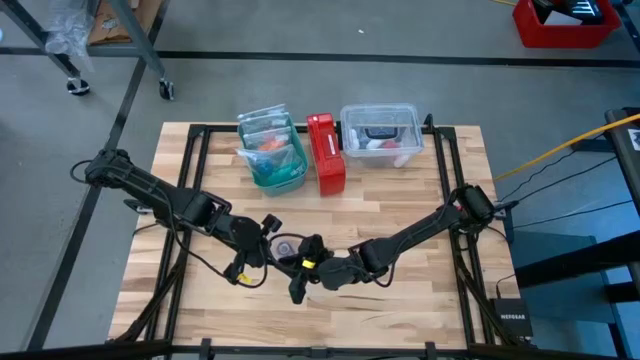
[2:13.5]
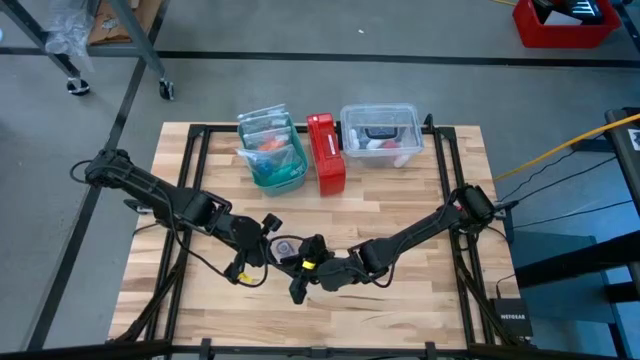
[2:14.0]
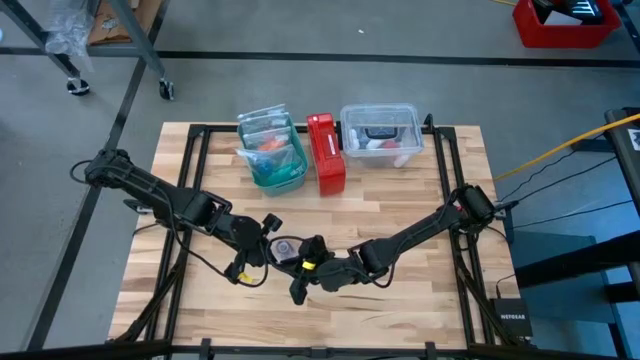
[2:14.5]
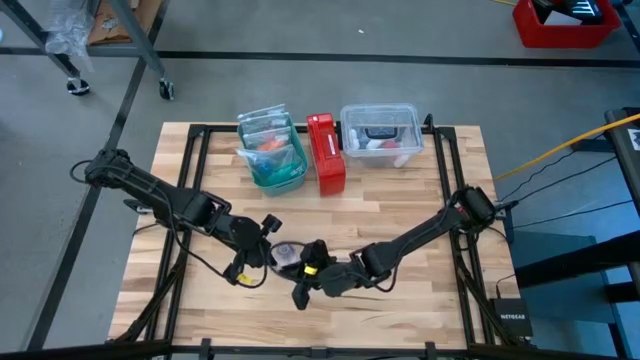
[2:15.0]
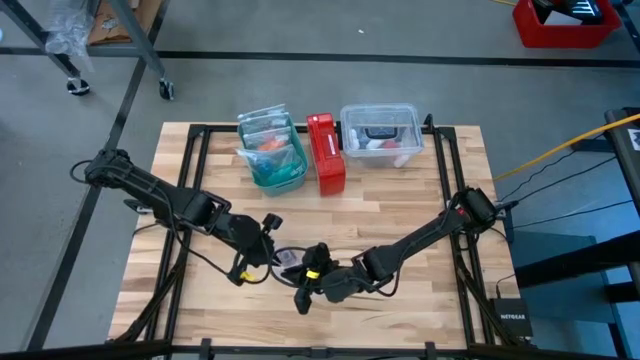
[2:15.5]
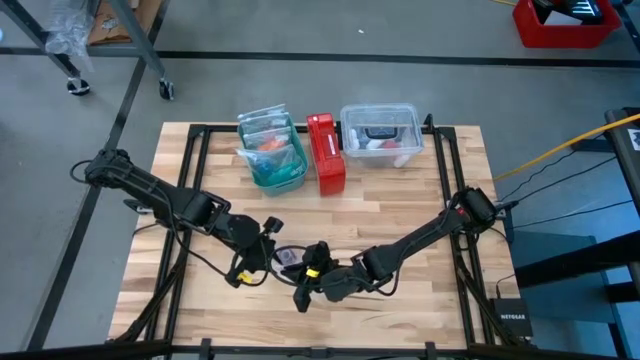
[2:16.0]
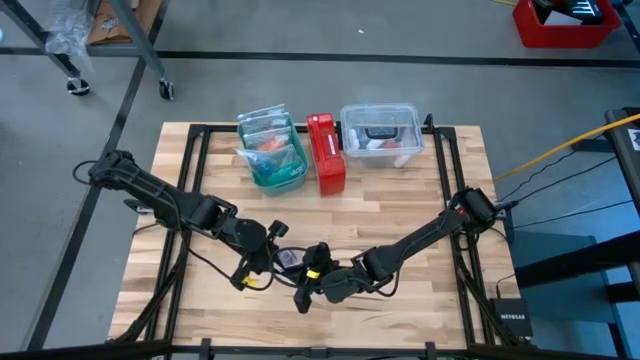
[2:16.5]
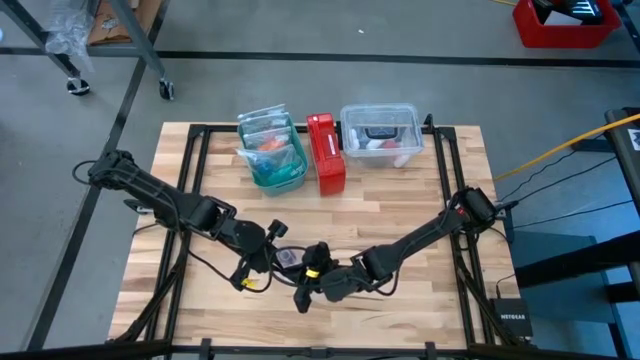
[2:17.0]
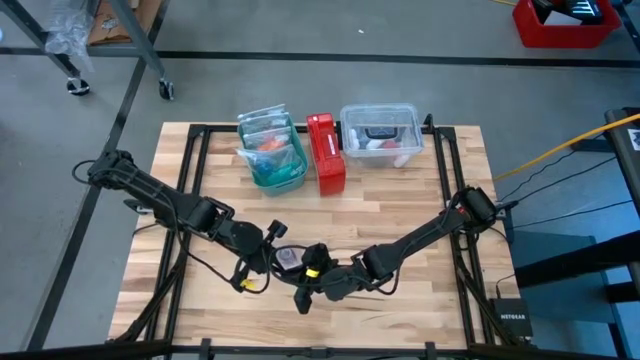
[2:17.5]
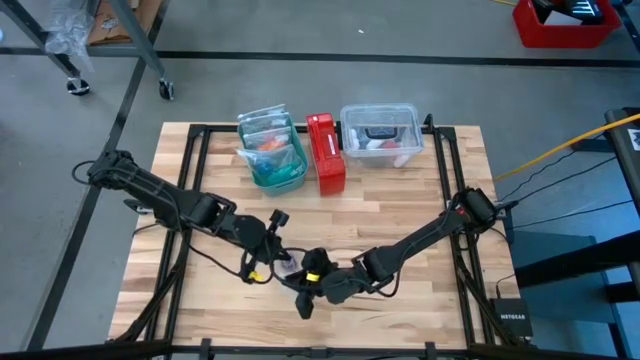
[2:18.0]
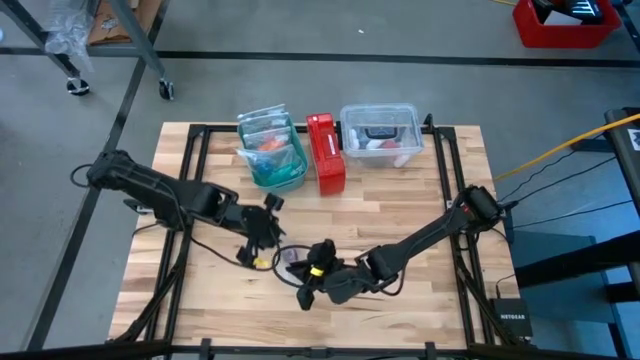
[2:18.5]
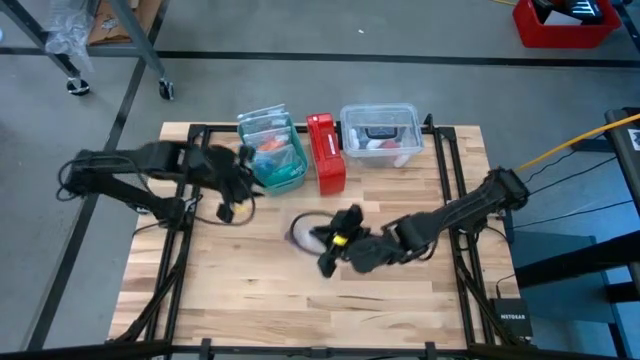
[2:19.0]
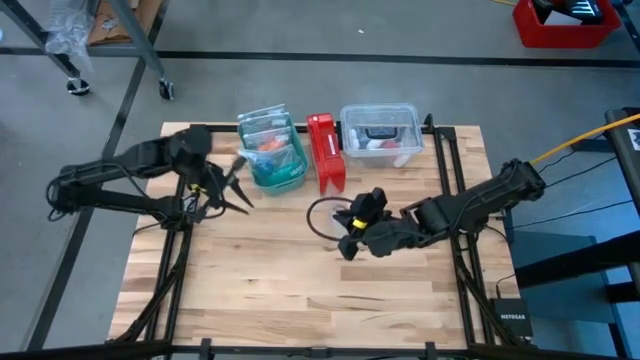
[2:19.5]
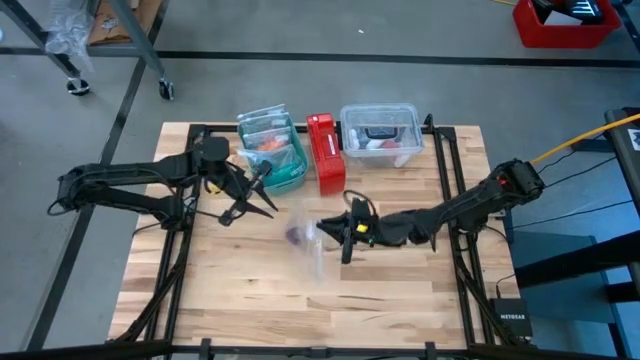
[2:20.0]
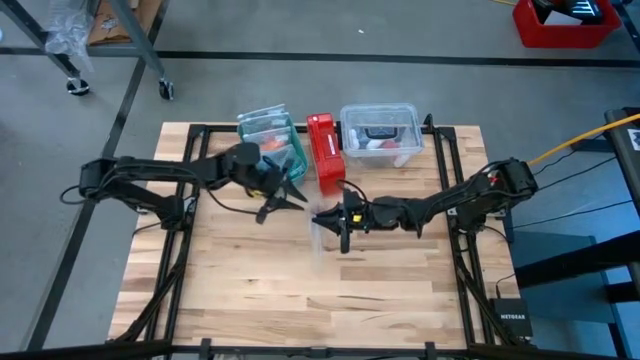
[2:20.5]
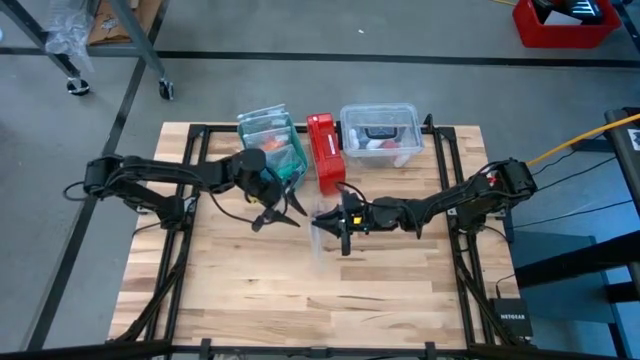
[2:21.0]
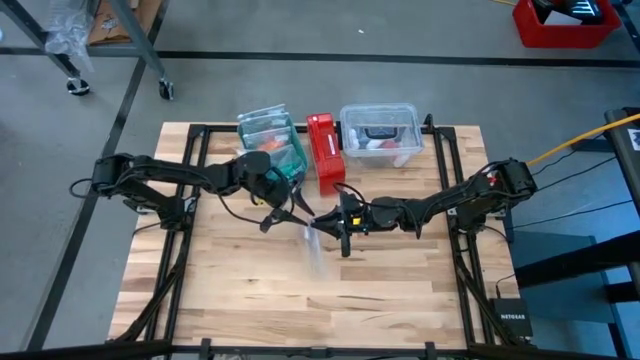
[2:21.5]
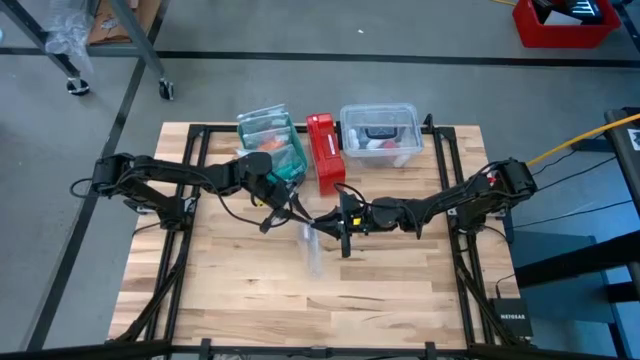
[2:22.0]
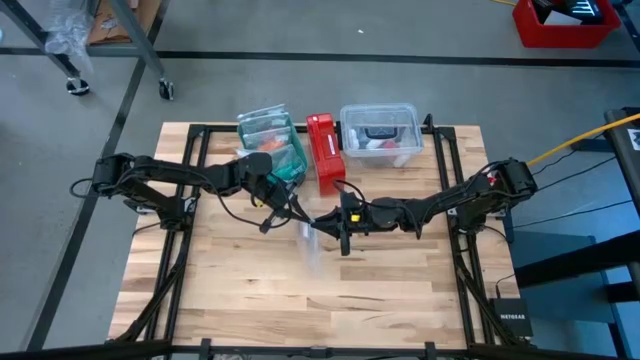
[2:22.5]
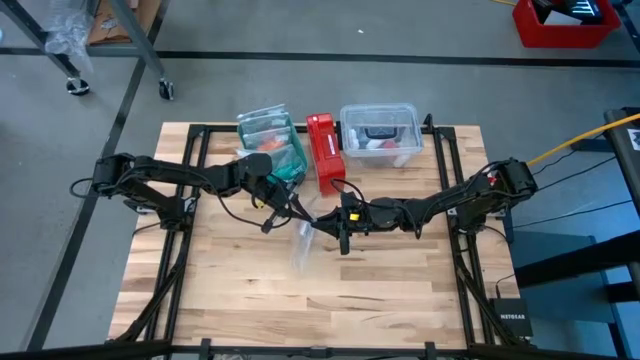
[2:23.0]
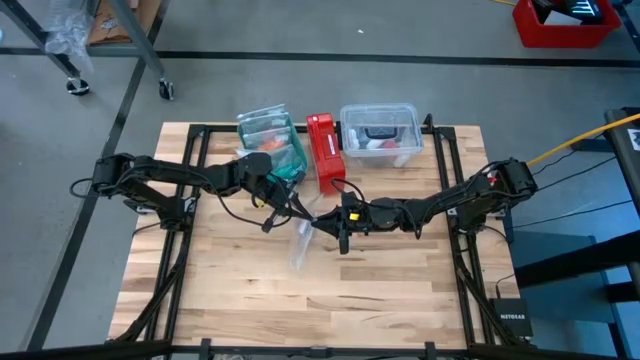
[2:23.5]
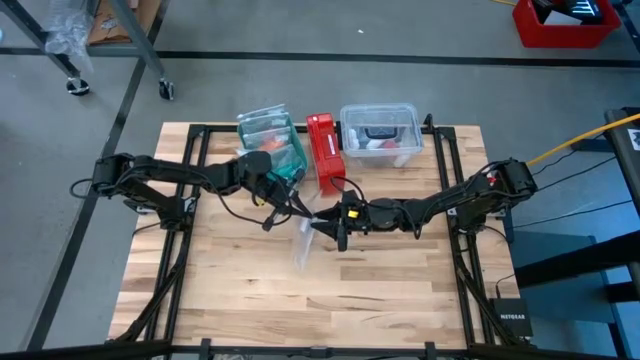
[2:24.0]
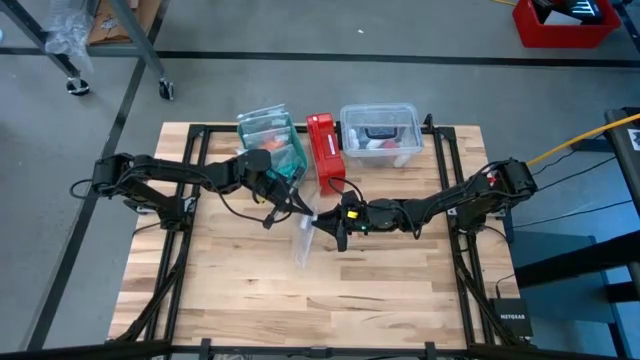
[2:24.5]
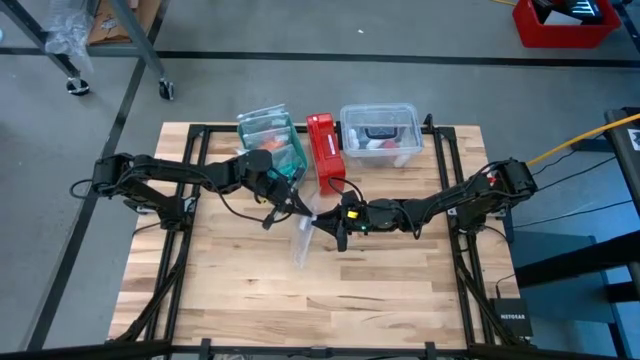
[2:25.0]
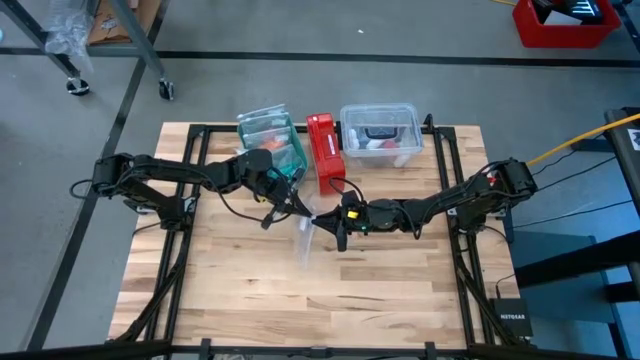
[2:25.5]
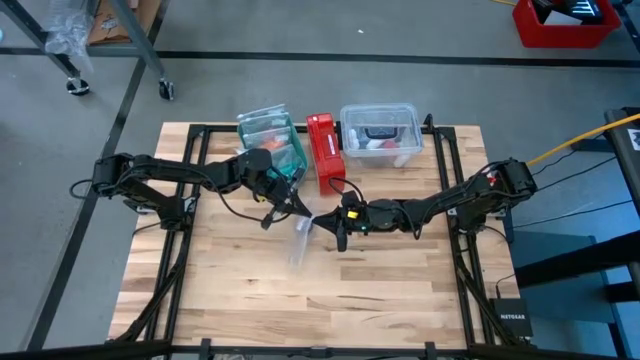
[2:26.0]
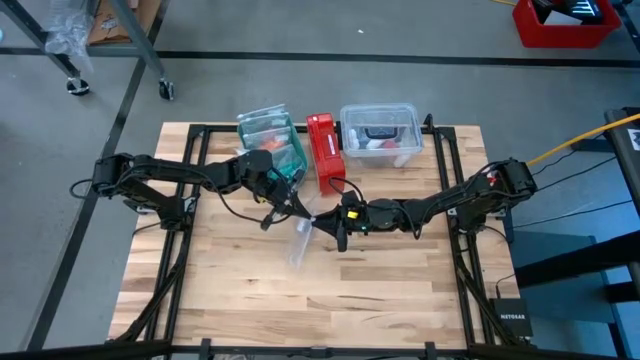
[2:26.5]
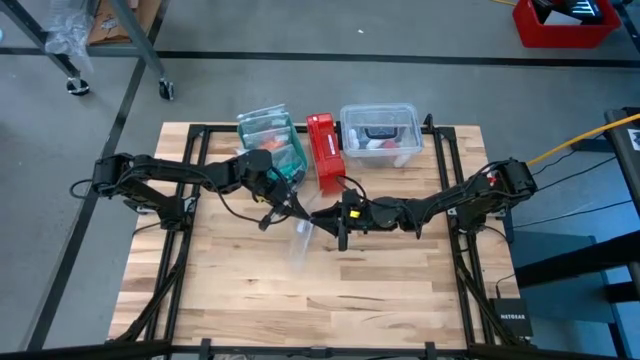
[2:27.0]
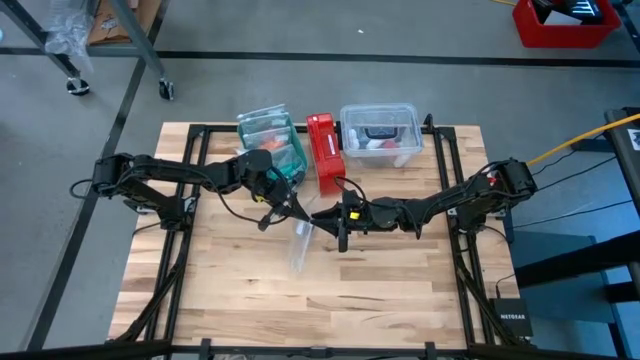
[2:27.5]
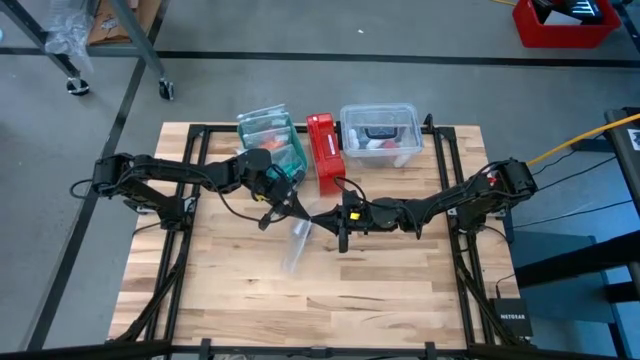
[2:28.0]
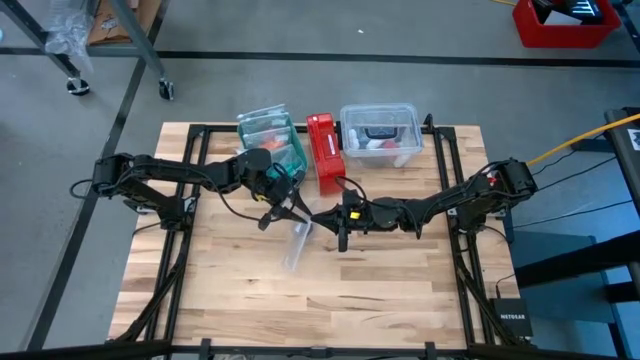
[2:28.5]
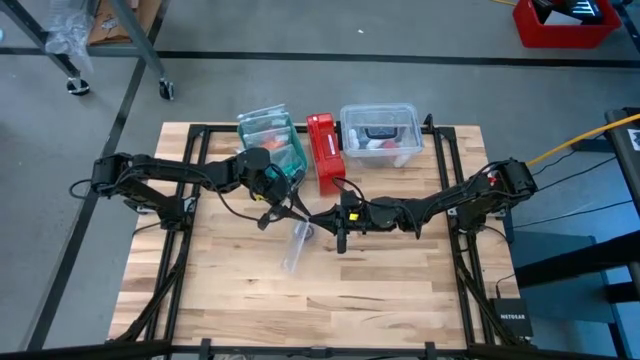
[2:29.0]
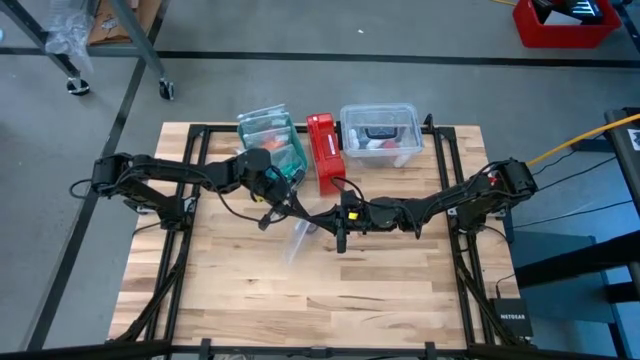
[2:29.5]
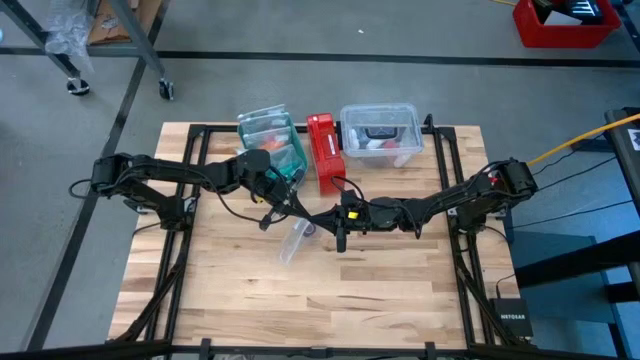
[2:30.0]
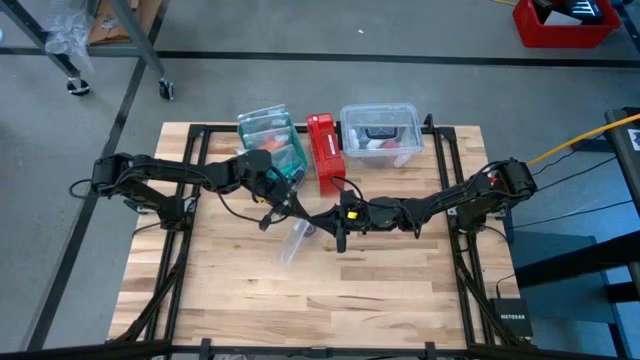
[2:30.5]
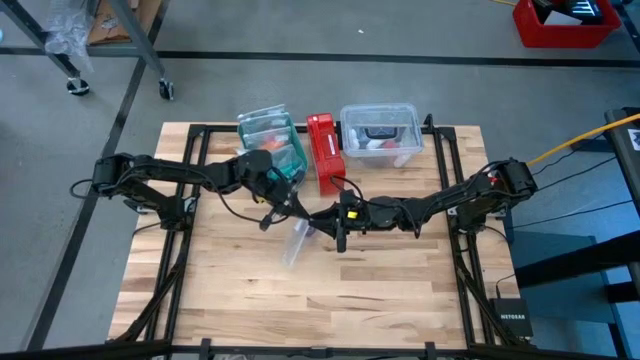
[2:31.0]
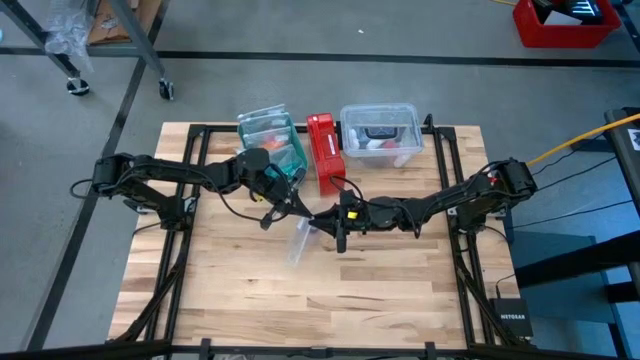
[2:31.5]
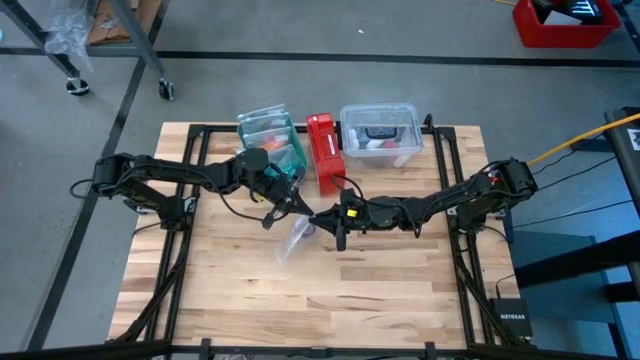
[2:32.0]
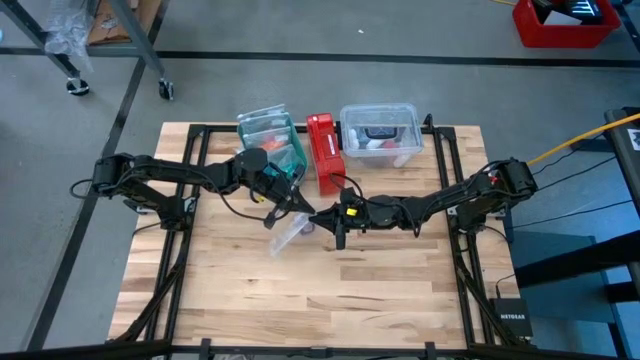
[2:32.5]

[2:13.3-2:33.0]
Task: Roll bandage
Close the transparent zip bag

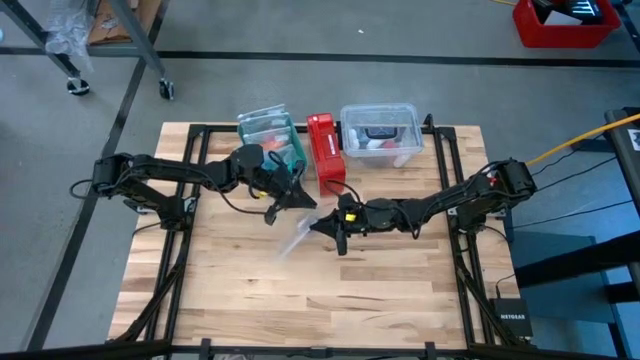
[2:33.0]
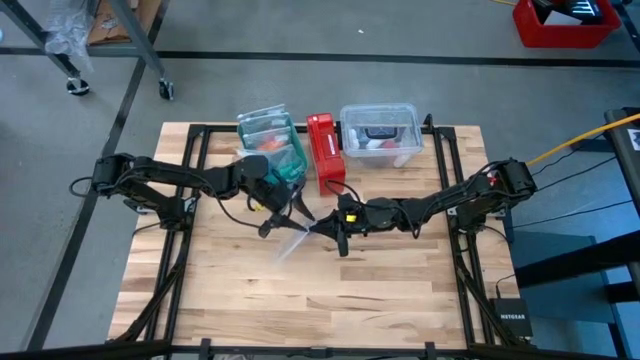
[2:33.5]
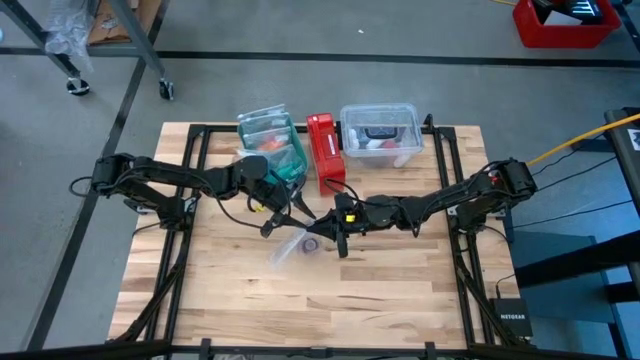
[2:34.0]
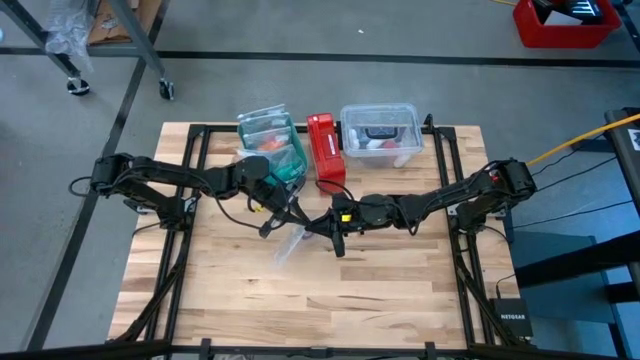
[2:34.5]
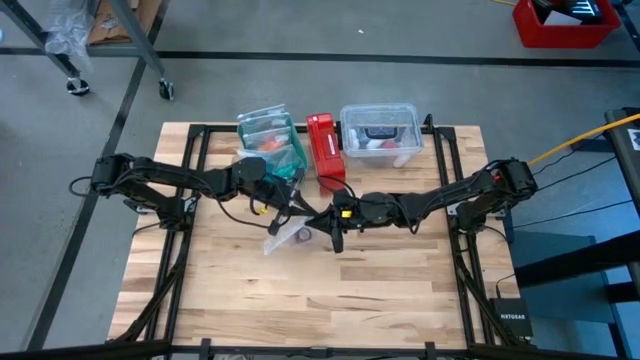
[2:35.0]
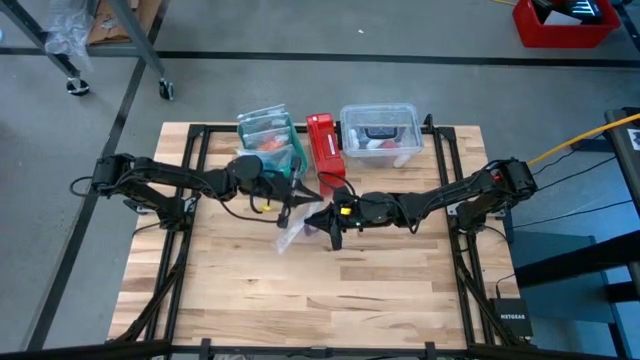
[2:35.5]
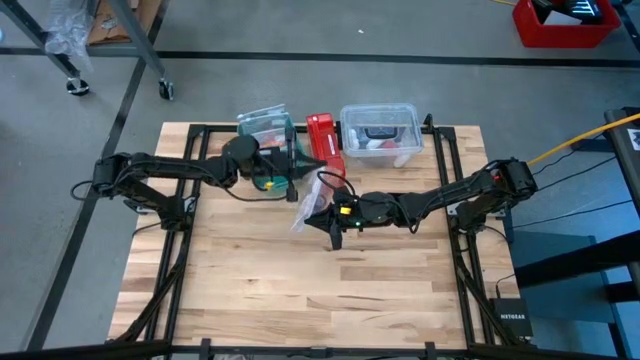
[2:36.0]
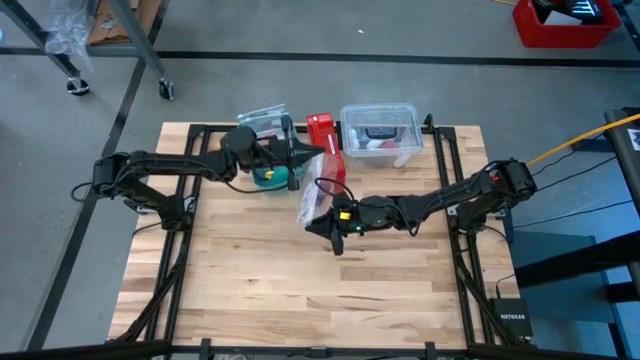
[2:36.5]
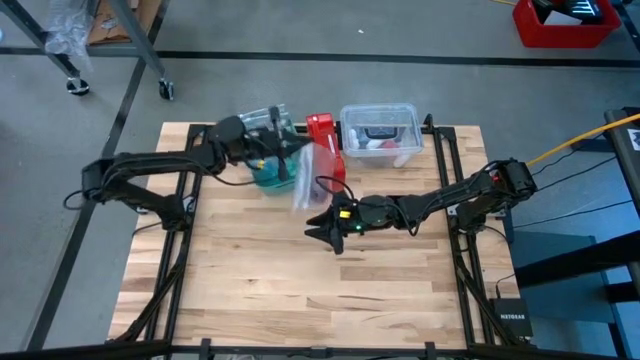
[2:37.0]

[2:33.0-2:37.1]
Close the transparent zip bag
